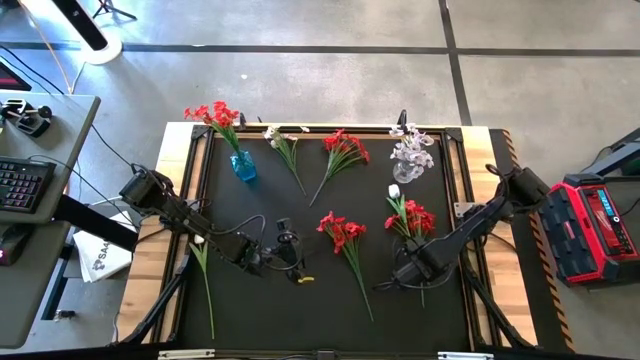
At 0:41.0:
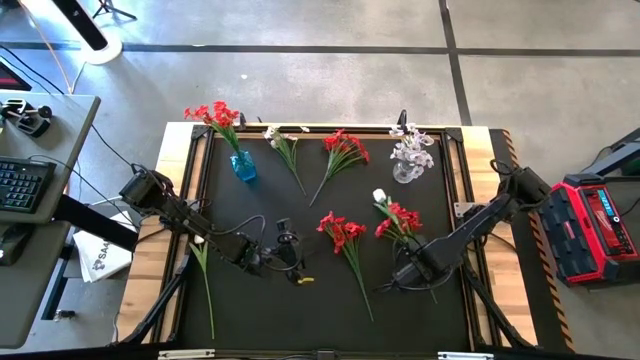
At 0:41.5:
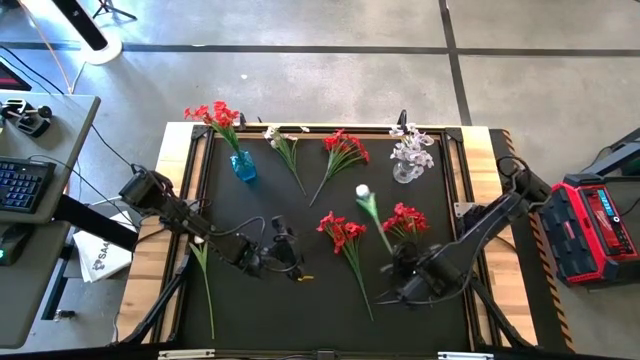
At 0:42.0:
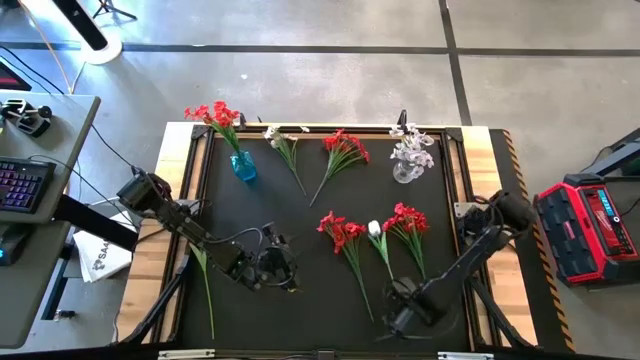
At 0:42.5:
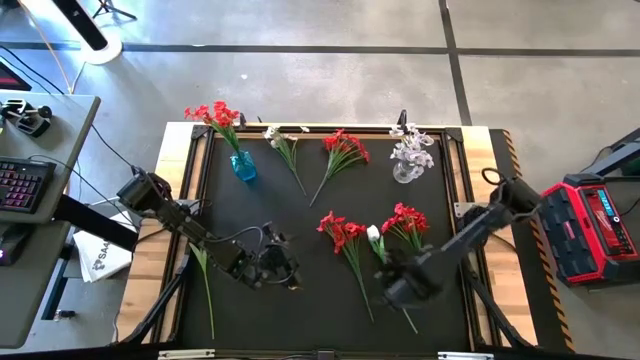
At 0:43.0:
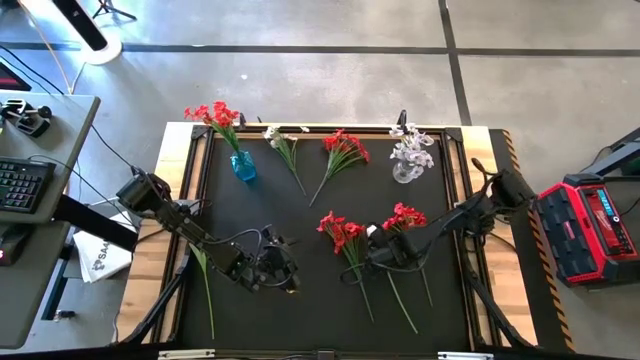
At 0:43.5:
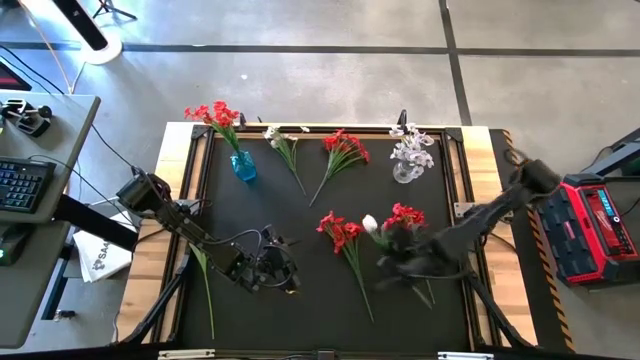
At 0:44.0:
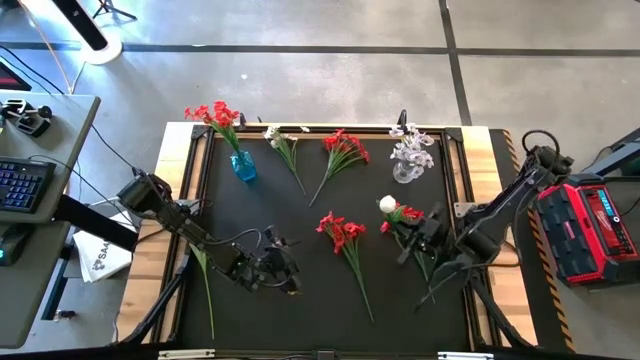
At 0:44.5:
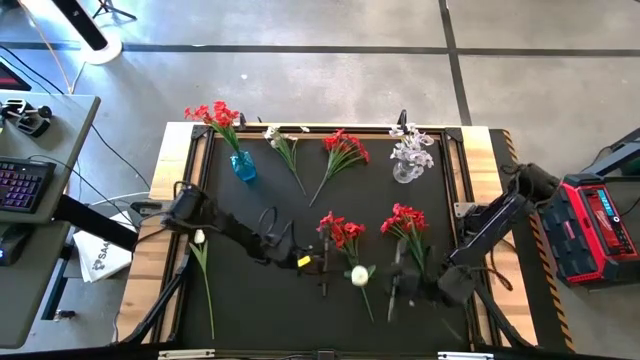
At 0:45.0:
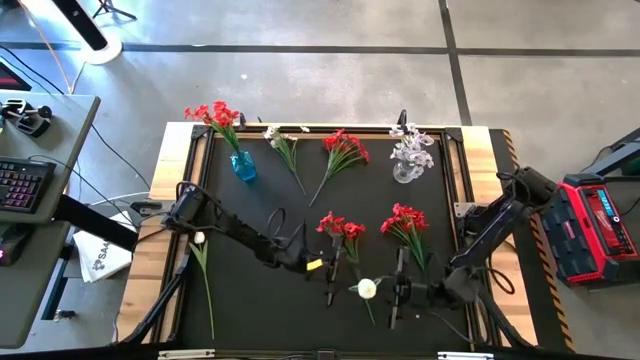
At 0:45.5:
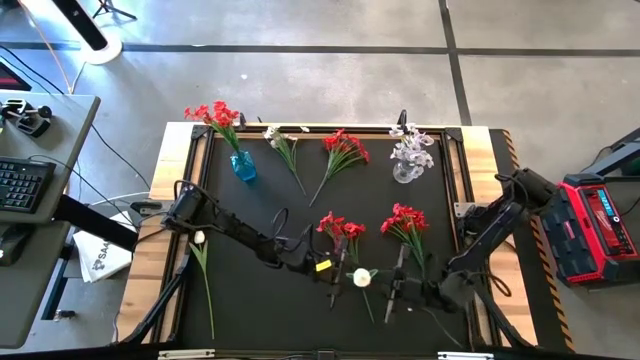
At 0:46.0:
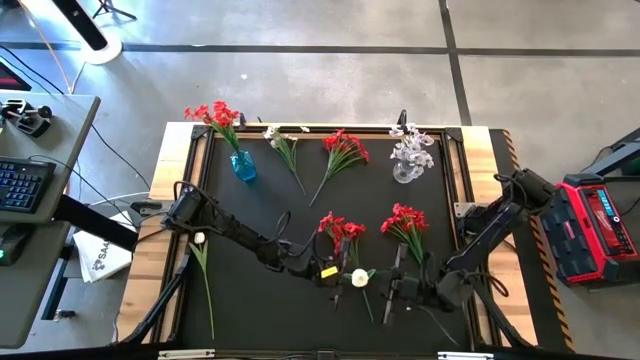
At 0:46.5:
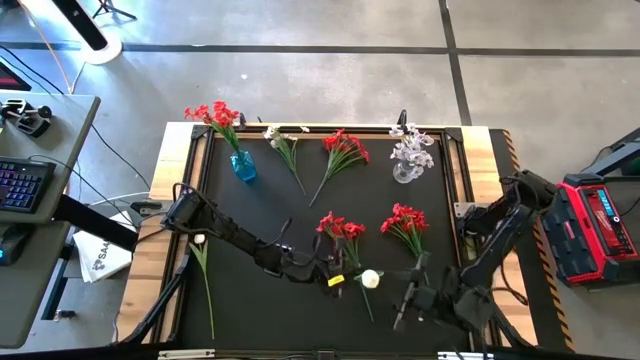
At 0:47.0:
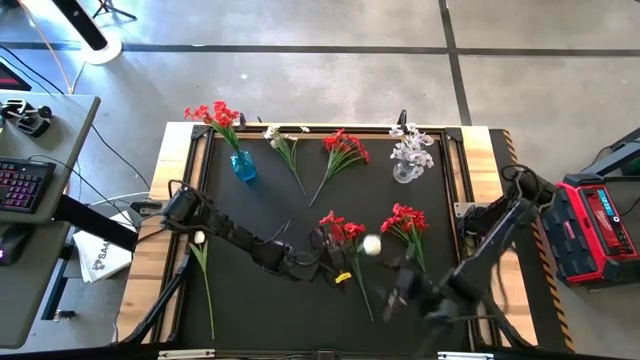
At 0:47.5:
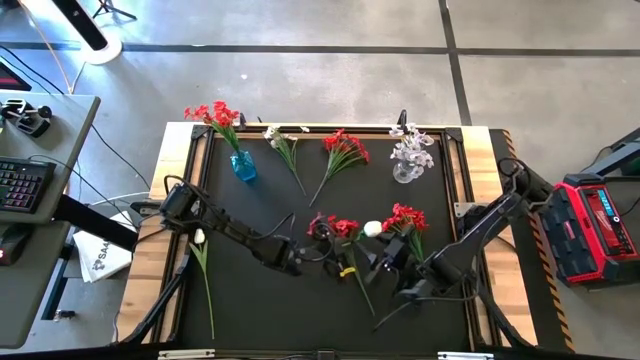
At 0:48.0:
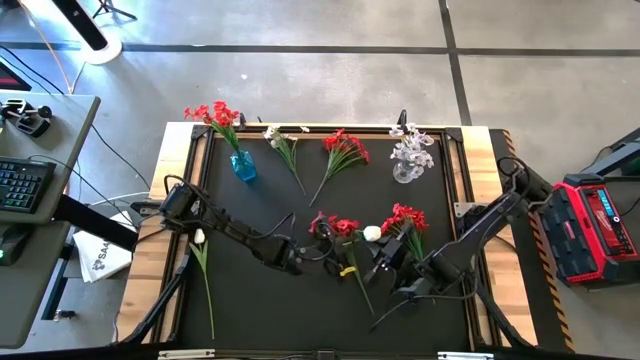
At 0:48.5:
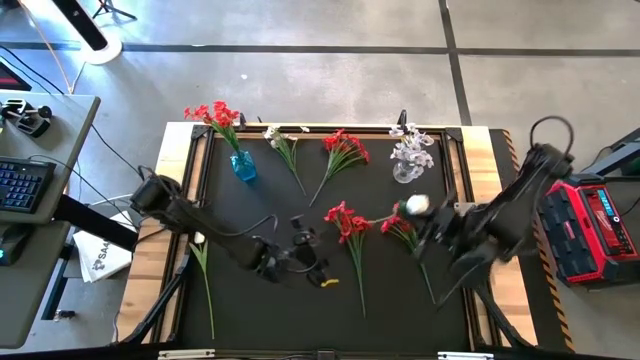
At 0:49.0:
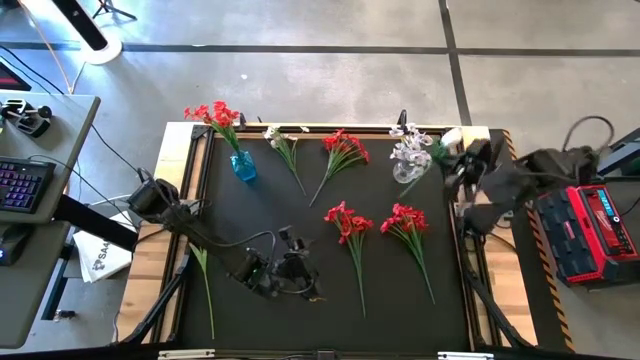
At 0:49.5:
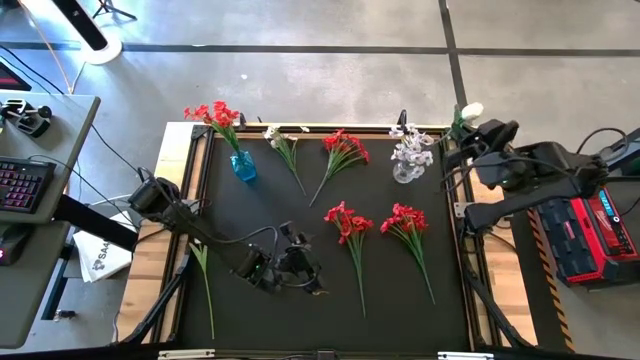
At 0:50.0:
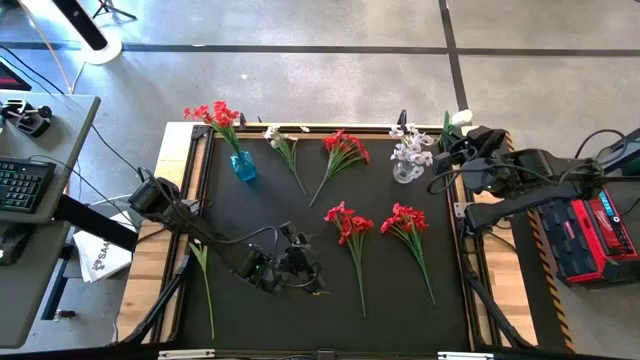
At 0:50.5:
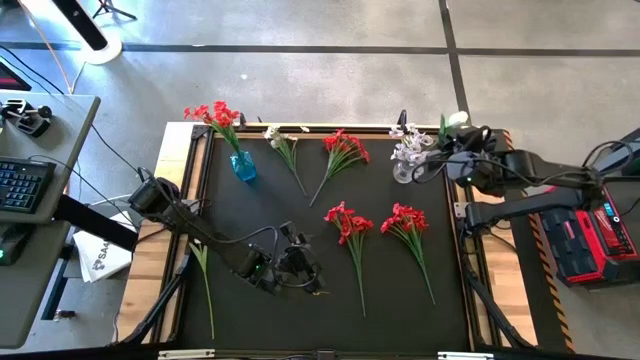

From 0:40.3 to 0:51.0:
Task: Sort flowers into vase by color
Put the white flower into the transparent vase

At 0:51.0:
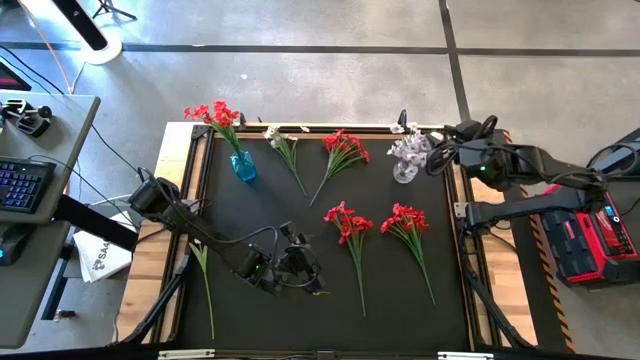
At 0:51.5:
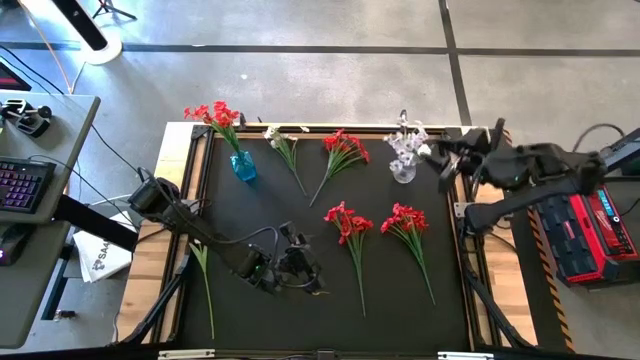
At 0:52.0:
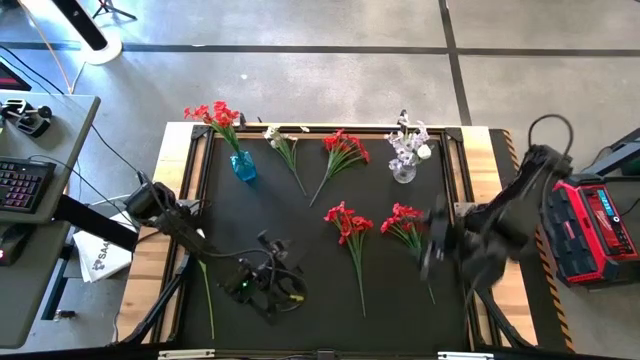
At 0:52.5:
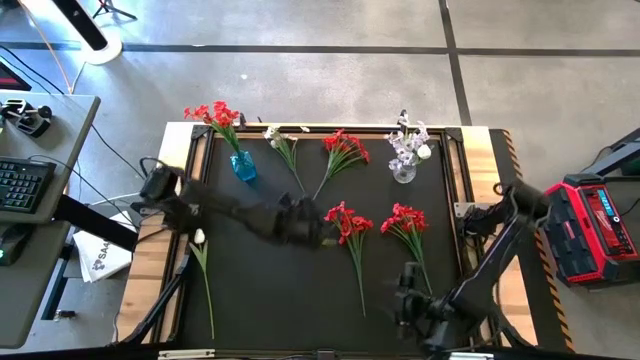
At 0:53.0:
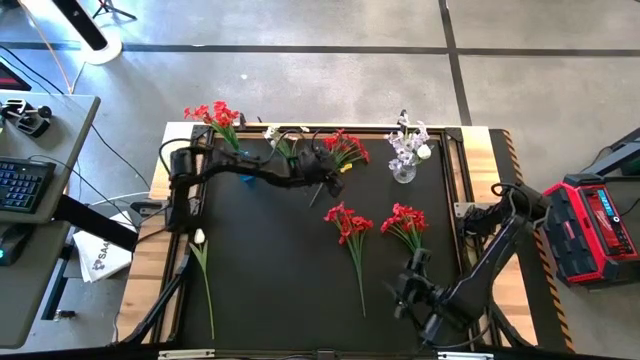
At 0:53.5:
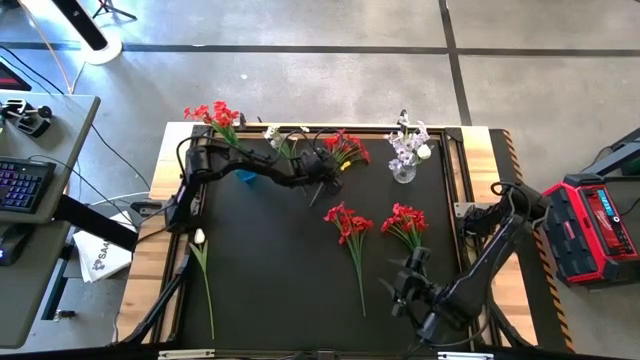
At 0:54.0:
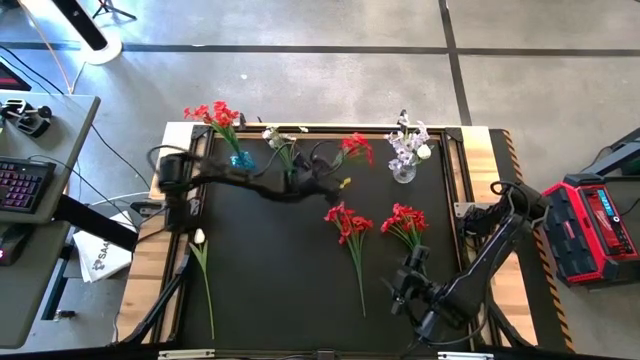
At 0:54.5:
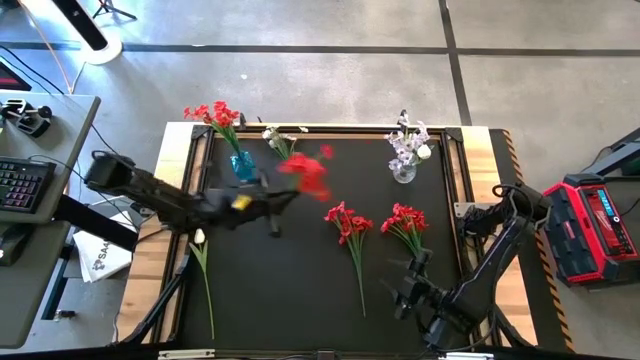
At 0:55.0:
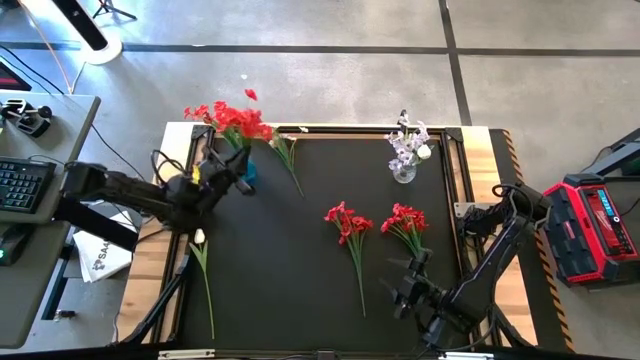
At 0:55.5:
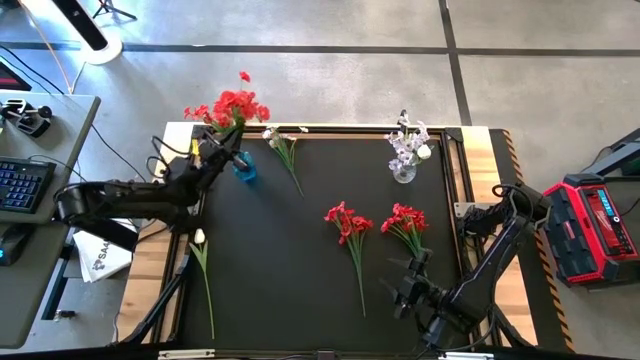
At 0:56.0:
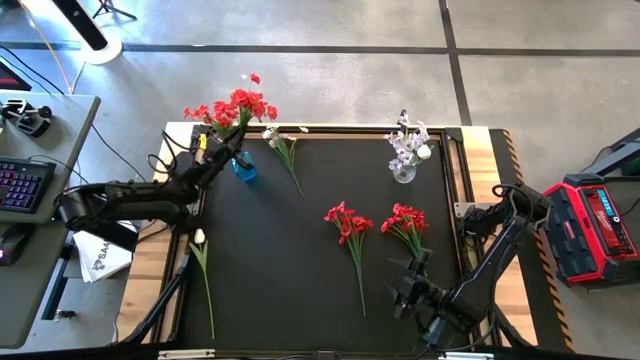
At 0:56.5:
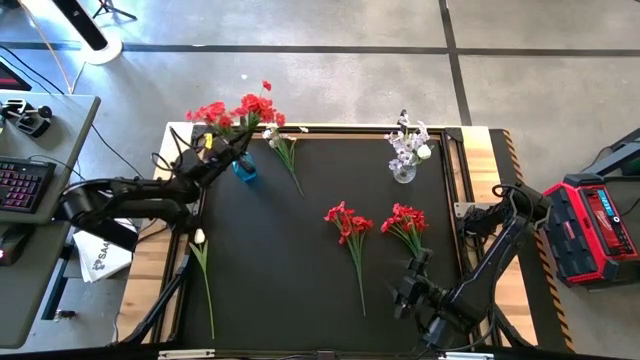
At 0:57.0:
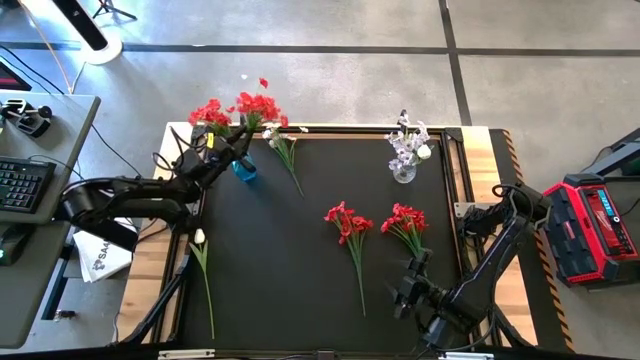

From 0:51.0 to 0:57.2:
Put the red flowers into the blue vase

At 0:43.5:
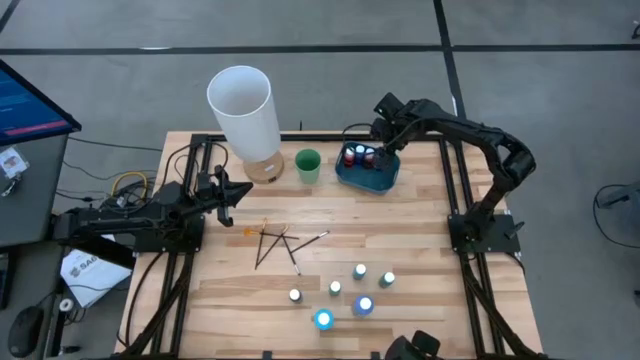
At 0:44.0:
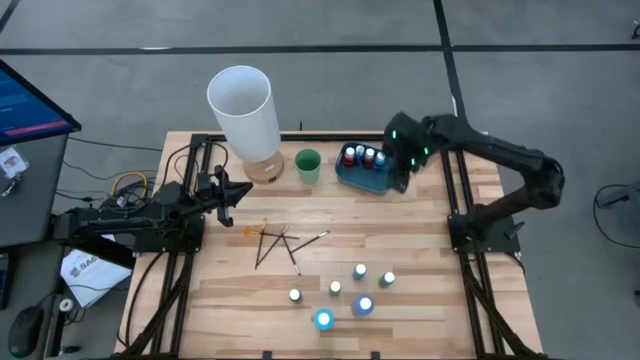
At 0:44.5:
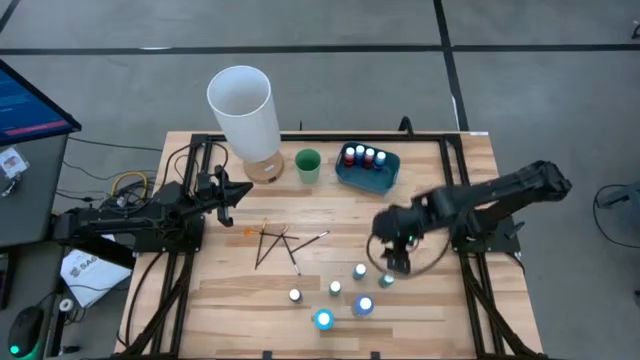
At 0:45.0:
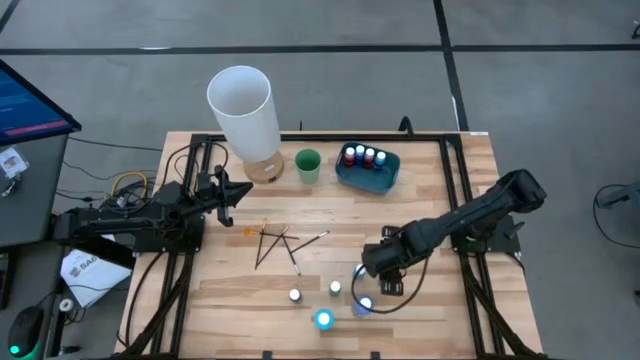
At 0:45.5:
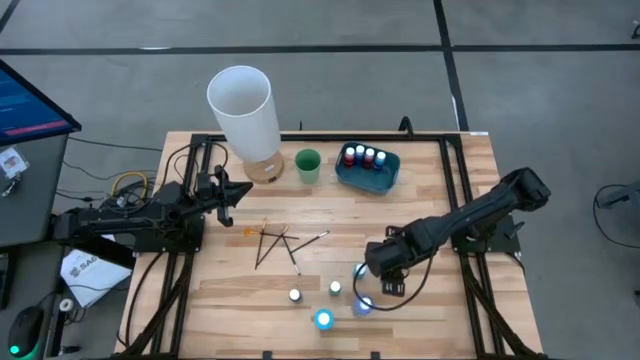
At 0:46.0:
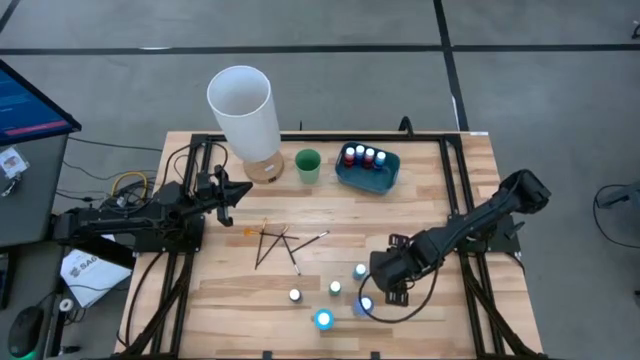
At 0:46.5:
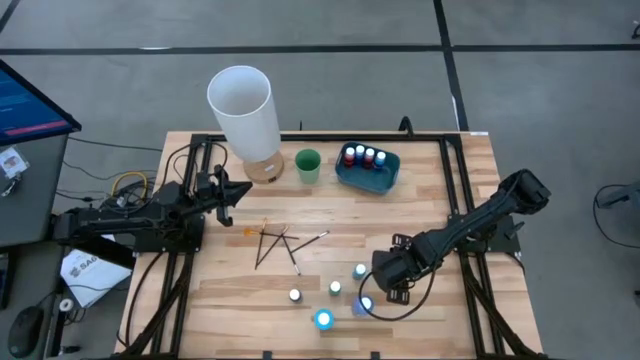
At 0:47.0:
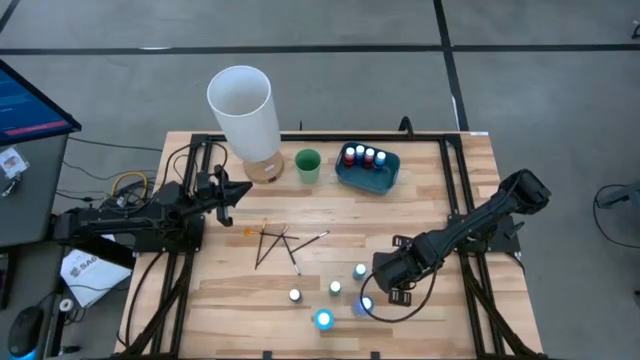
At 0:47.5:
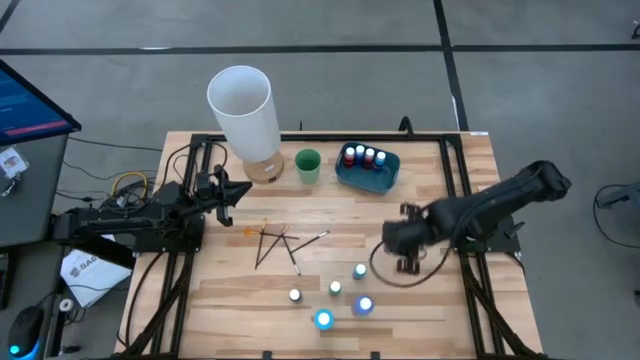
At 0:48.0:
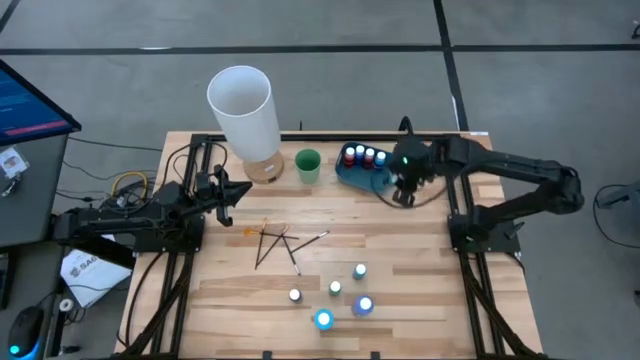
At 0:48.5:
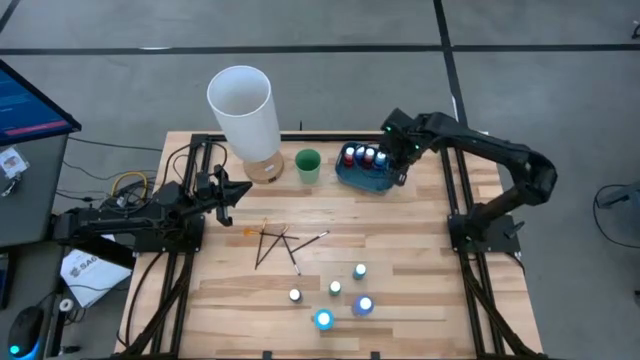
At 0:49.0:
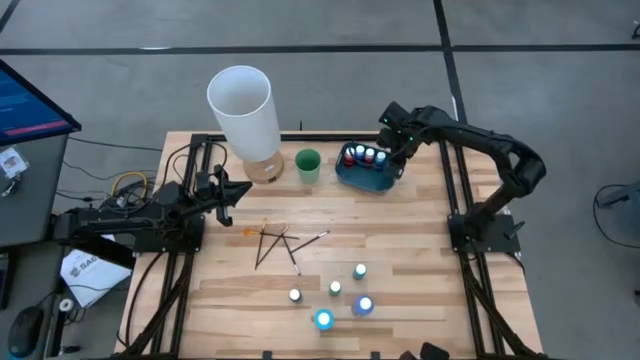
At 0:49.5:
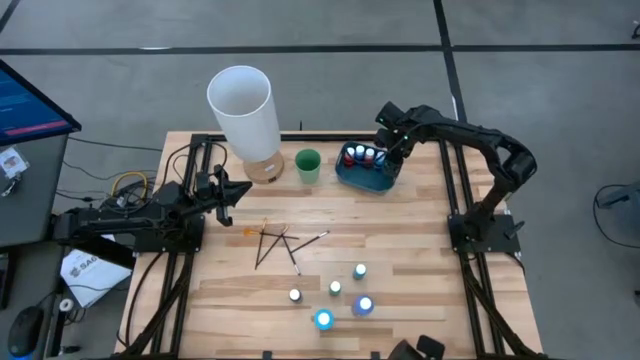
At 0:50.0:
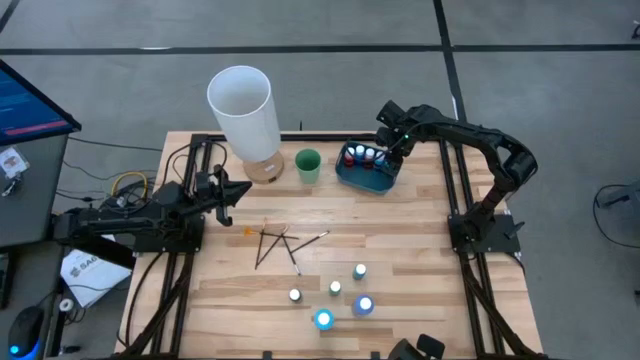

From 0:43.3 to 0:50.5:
Task: Pick & Place Paint Supplies
Put the top green paint bottle into the blue bin
